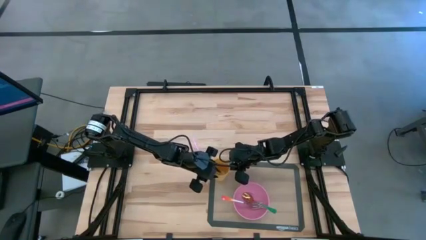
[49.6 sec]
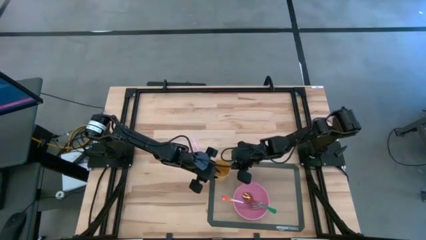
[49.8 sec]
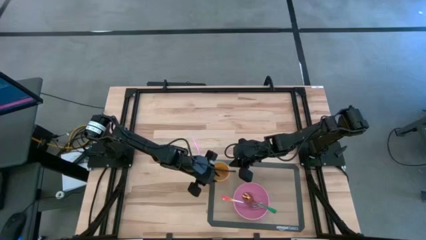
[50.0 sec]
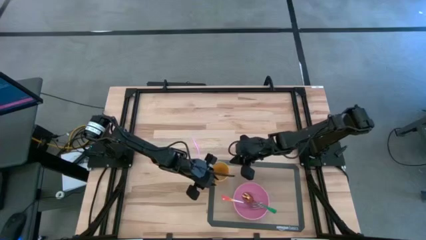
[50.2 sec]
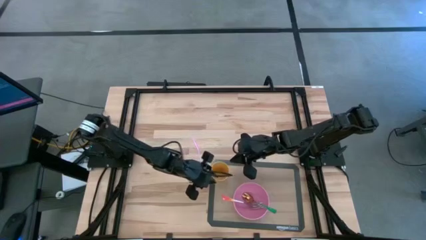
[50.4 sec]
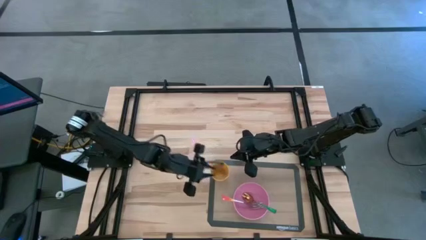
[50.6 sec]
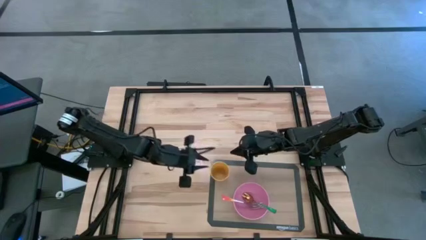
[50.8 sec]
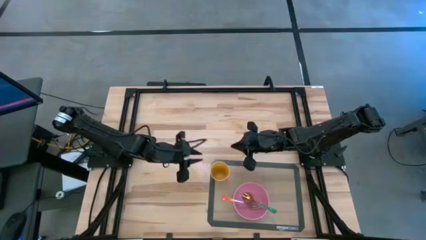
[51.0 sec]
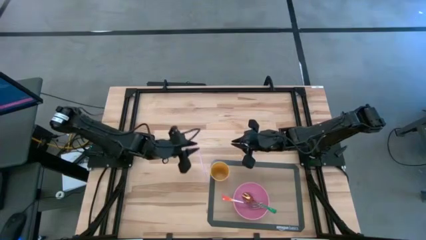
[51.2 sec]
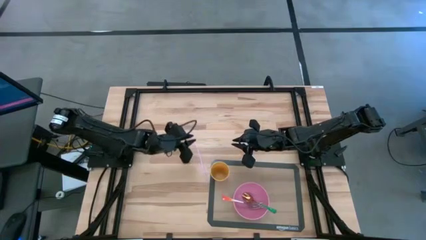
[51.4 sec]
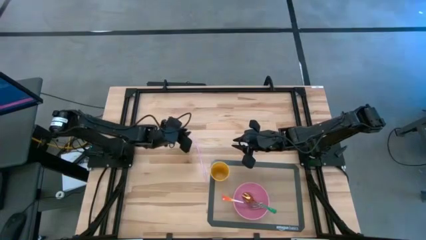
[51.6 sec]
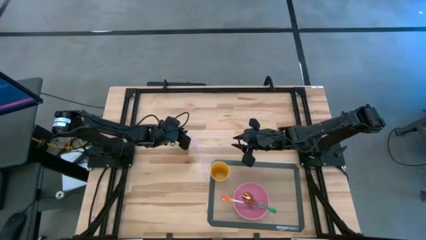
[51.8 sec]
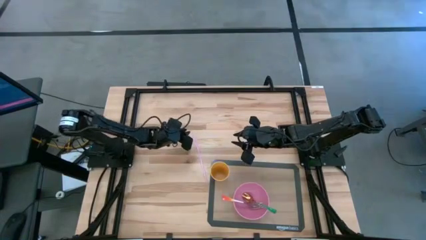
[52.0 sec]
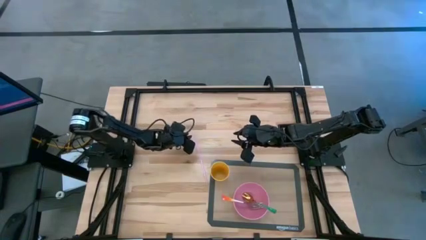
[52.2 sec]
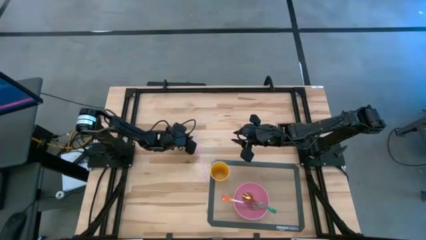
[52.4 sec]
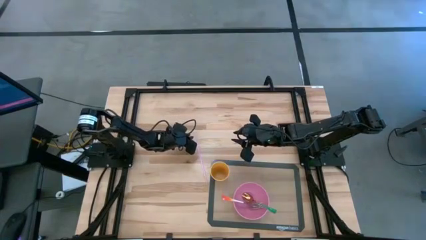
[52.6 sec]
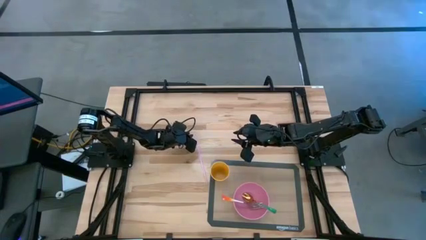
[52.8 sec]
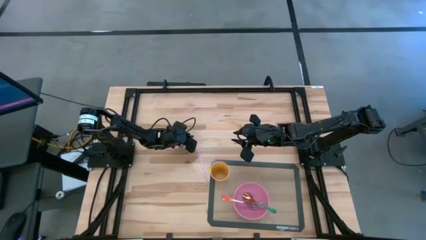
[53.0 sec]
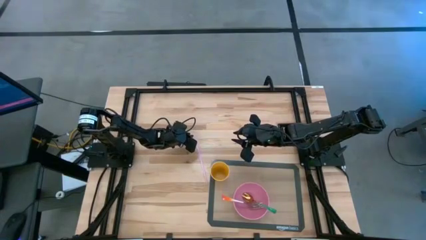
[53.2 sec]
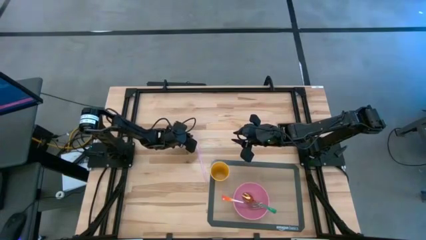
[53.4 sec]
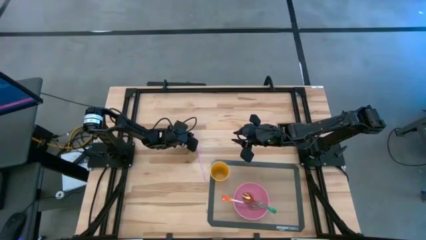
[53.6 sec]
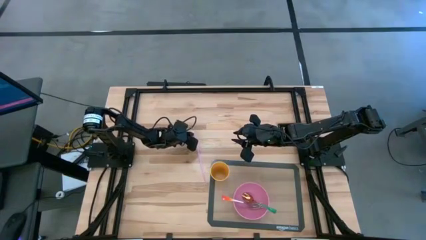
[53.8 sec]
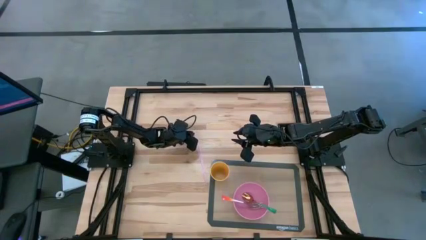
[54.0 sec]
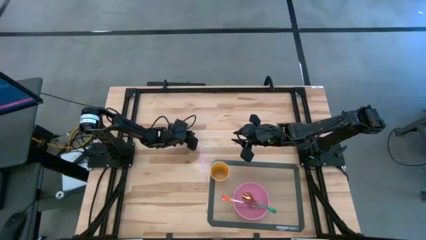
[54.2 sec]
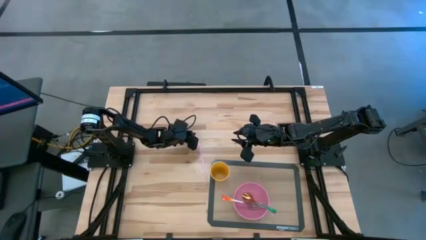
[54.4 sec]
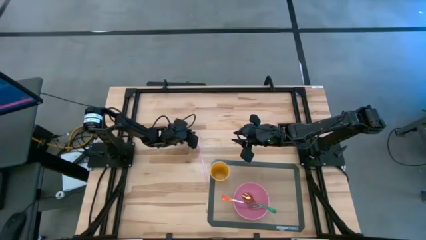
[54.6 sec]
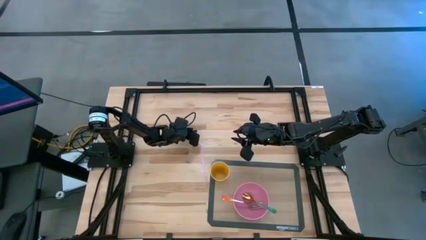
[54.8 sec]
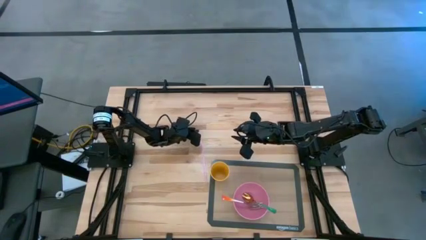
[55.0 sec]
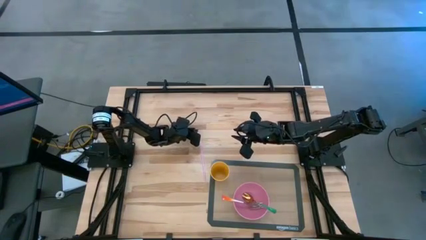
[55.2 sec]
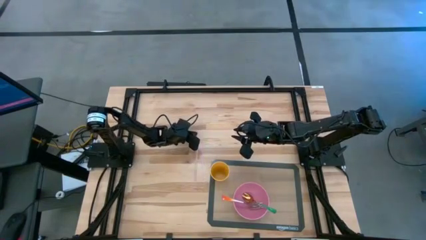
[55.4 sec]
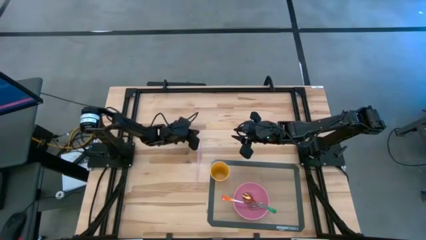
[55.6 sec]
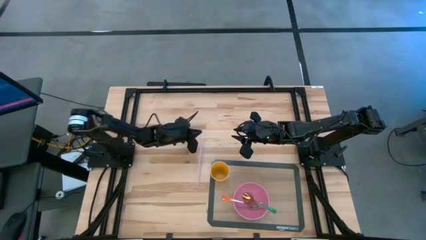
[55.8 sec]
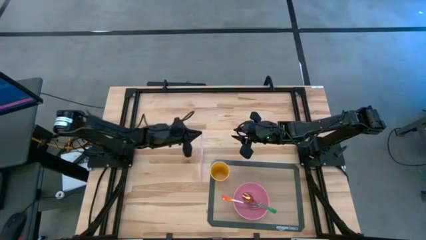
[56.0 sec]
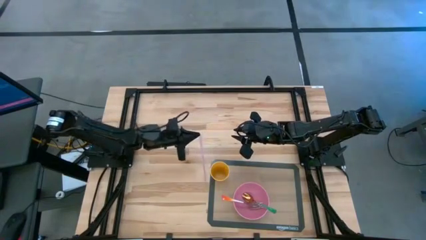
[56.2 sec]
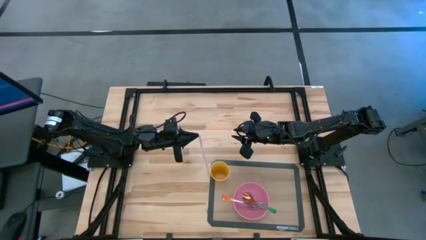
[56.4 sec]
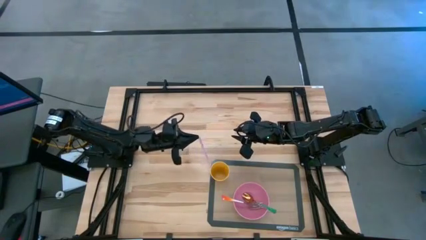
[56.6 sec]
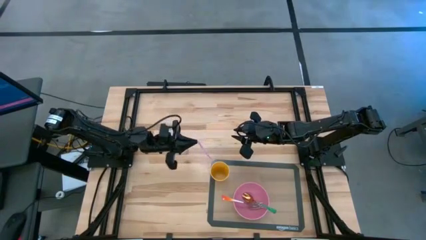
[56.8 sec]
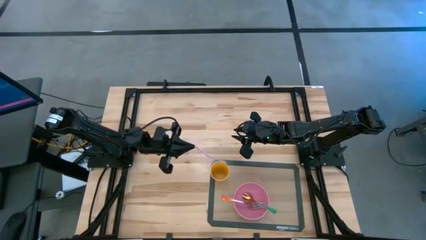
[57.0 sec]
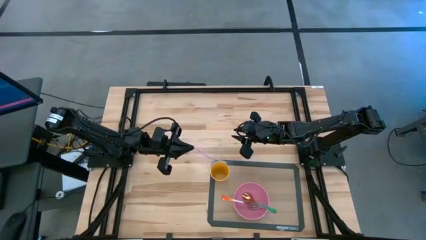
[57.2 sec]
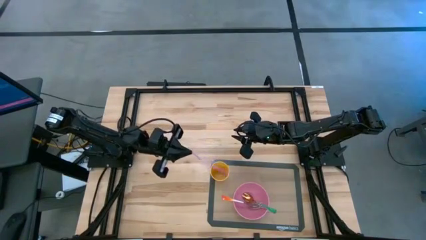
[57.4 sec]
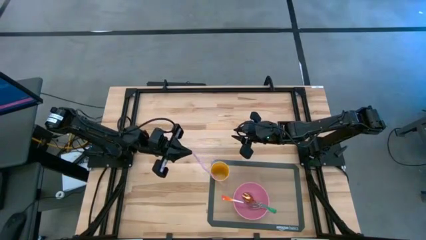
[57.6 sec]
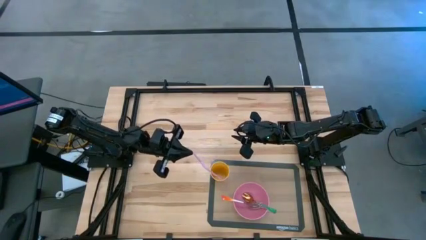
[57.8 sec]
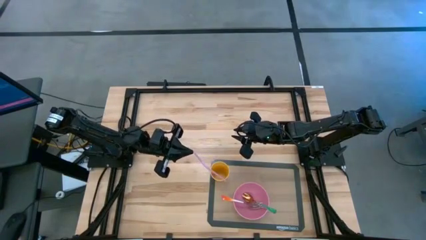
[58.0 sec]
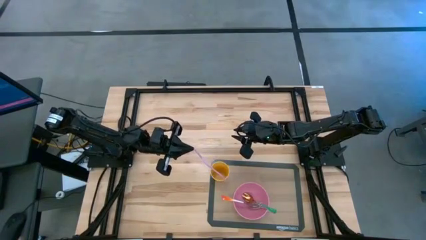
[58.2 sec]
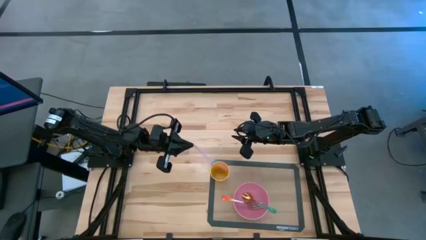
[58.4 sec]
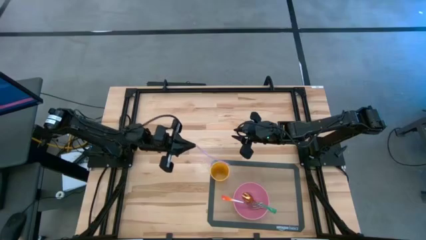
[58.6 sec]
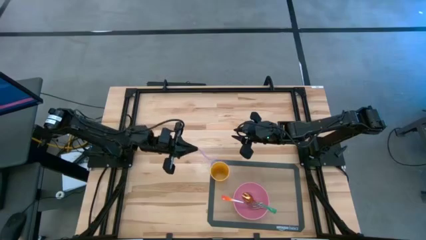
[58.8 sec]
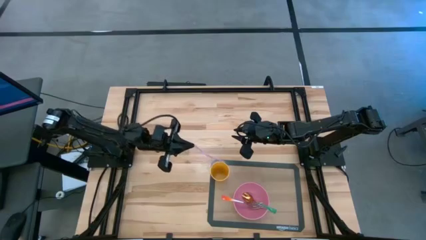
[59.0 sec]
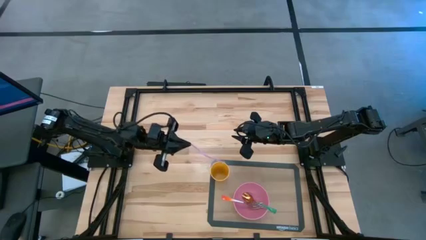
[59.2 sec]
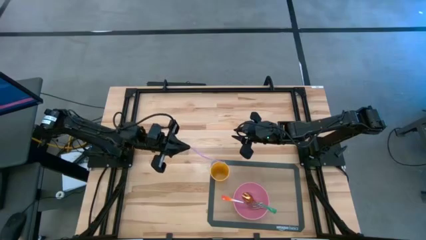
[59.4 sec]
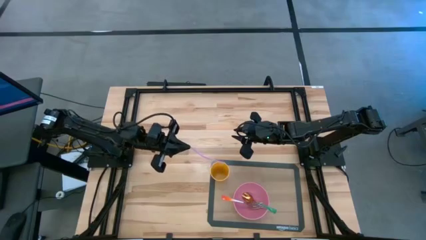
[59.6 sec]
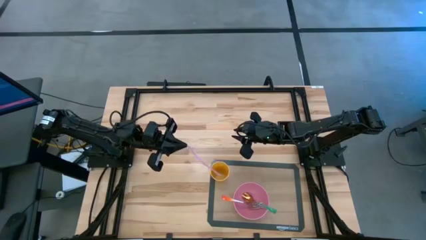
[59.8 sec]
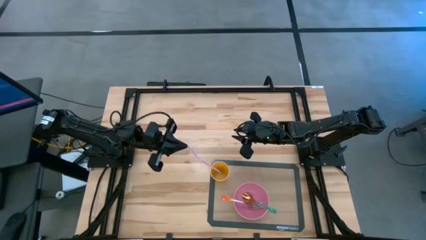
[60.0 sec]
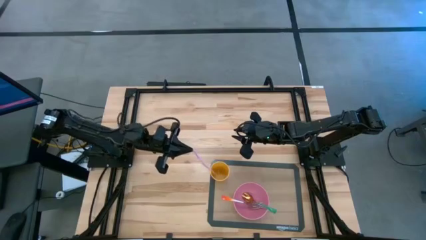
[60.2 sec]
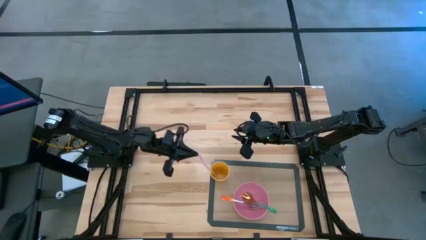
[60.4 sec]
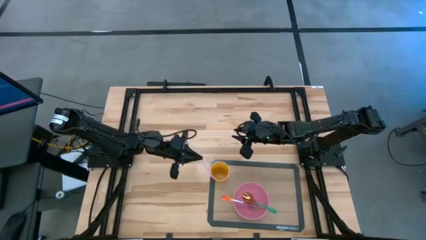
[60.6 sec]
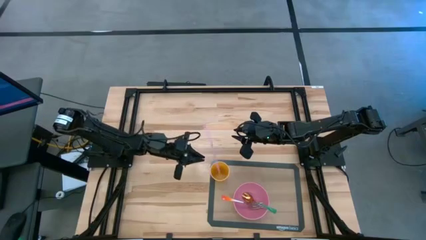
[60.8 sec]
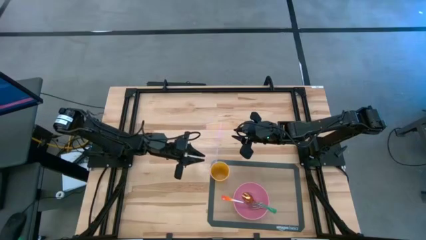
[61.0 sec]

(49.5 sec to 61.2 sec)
Task: Pick & Place Utensil
Put the pink straw in the yellow cup

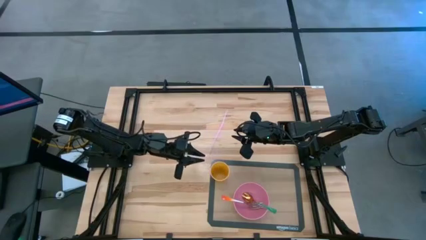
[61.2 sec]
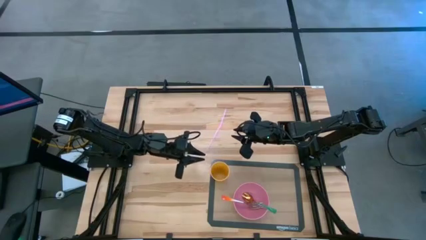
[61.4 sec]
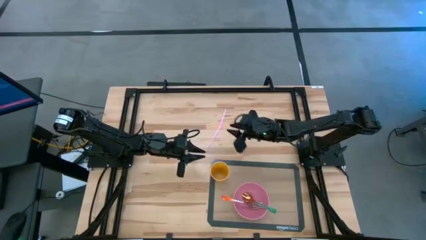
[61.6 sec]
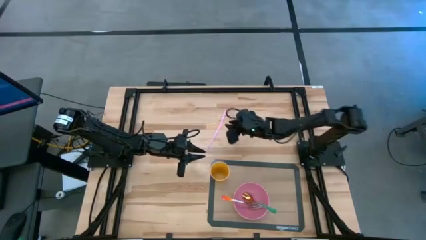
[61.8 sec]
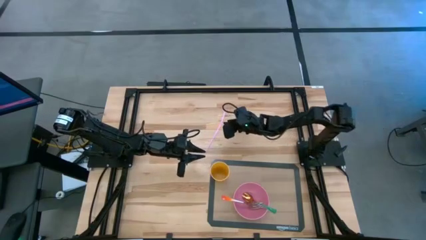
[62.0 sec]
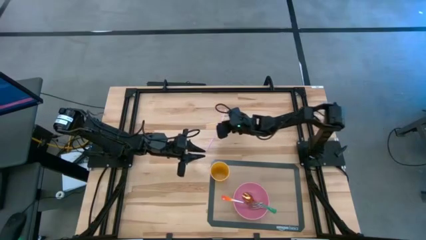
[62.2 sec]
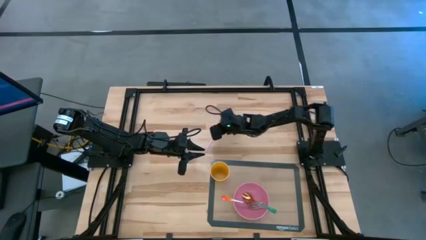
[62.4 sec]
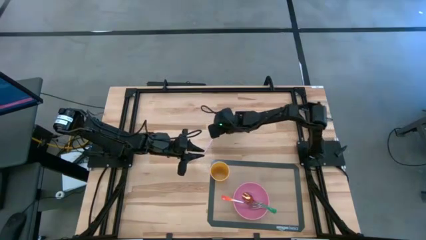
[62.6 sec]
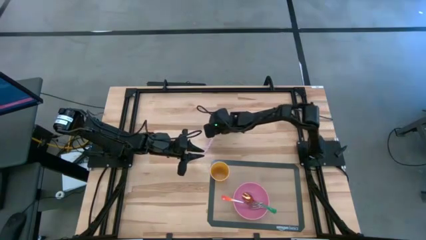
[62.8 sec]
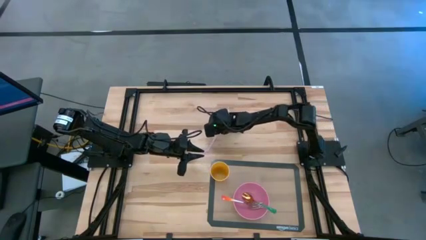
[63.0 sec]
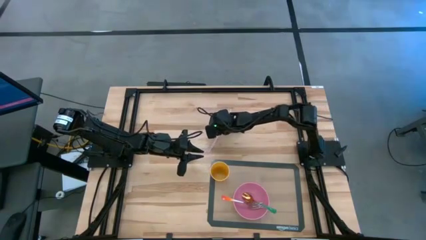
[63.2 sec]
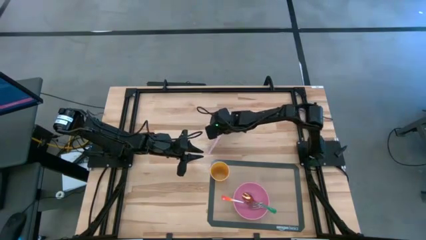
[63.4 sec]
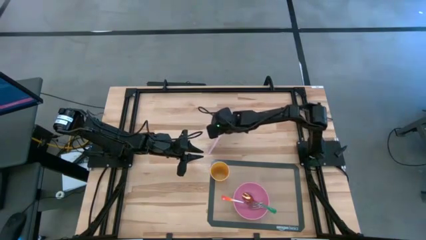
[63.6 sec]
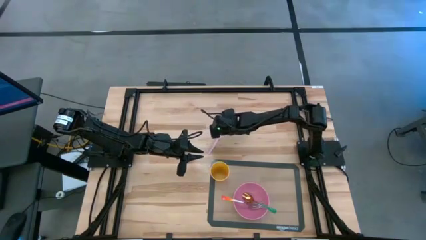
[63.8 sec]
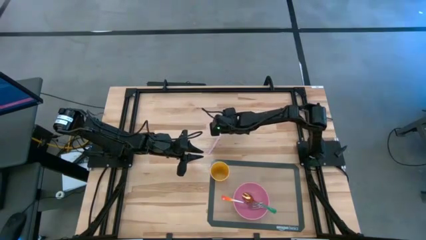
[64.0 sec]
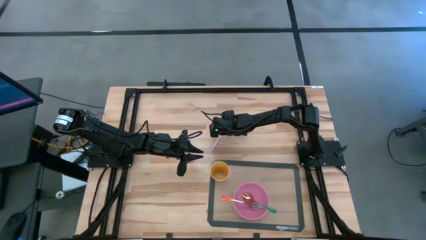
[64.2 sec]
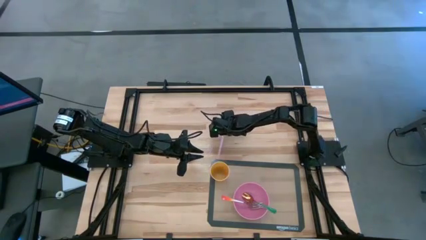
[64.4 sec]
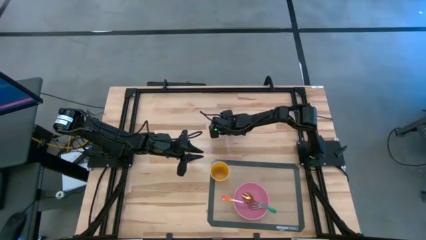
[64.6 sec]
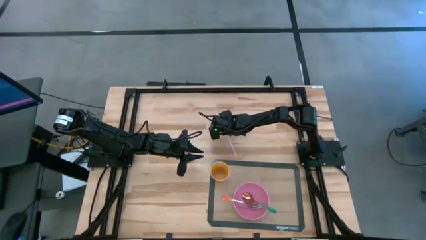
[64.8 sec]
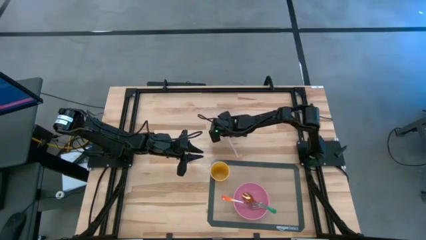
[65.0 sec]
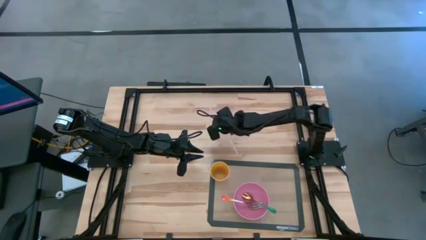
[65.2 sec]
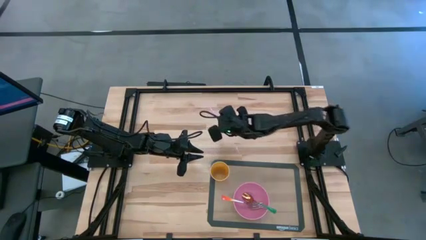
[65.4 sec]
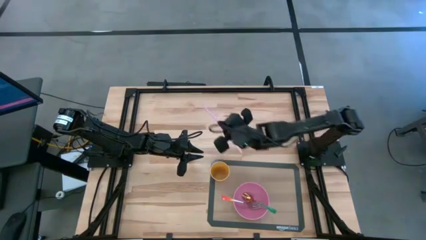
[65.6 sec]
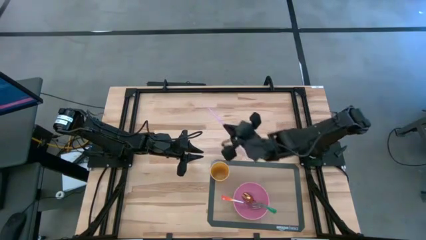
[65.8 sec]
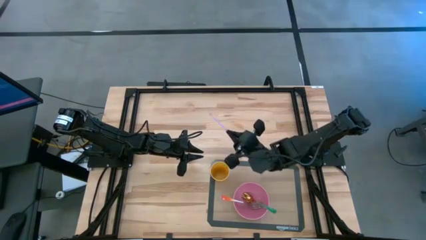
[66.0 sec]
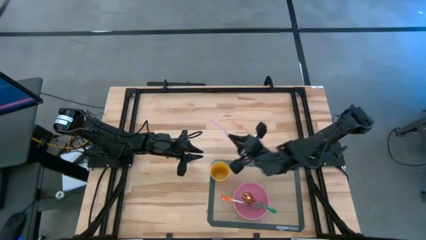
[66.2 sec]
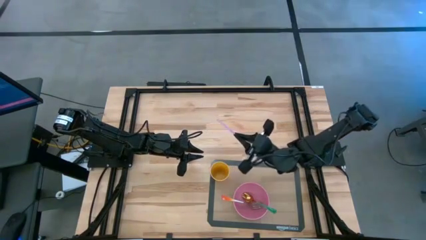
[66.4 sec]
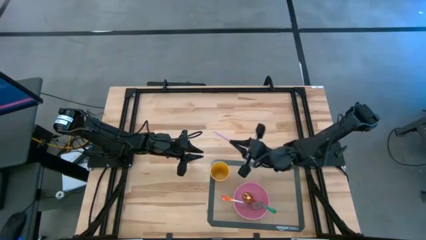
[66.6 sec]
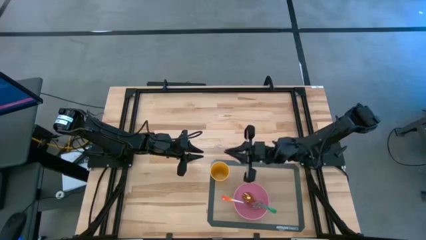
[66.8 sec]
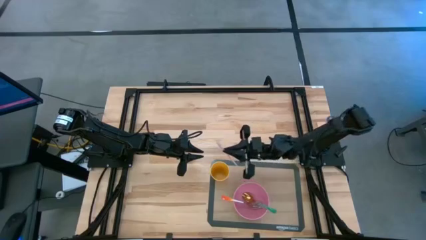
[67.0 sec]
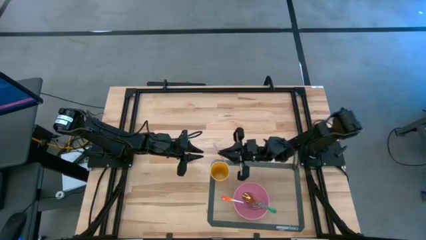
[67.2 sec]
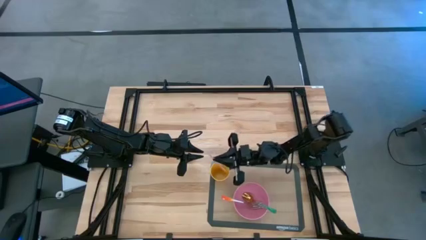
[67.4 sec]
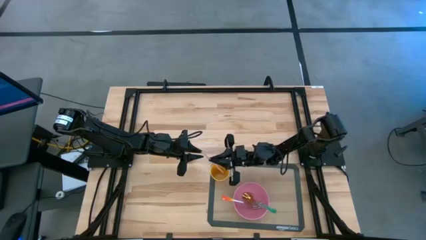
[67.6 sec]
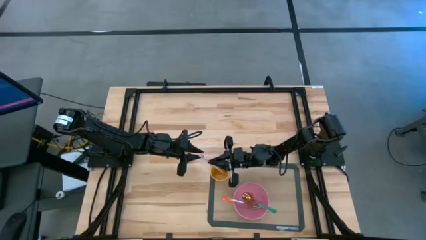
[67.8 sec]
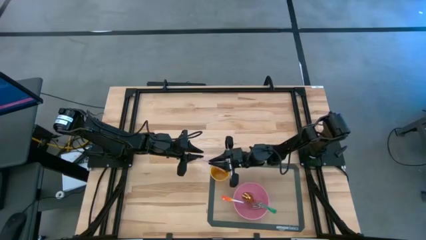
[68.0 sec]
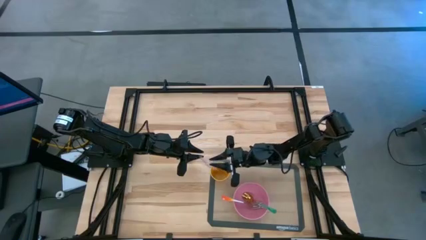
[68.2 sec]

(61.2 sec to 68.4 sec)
Put the pink straw in the yellow cup
